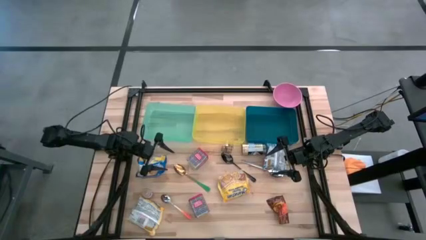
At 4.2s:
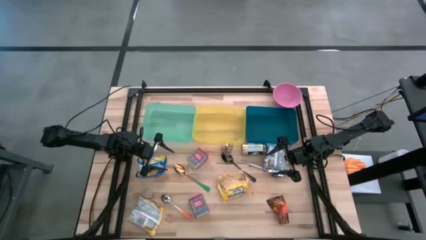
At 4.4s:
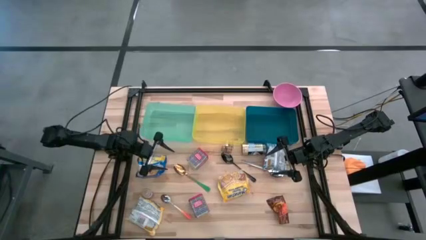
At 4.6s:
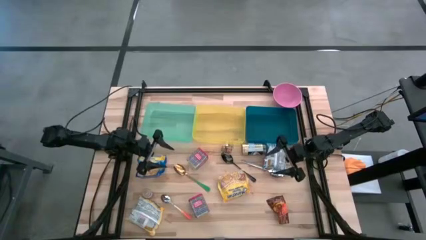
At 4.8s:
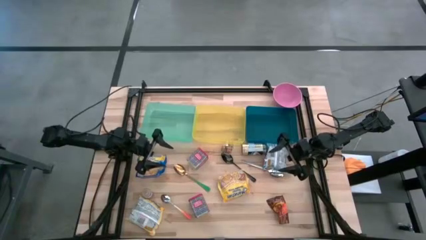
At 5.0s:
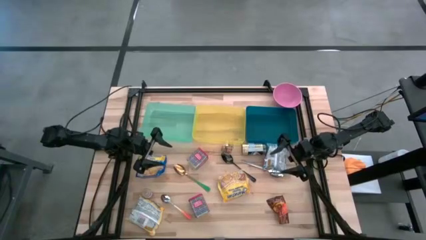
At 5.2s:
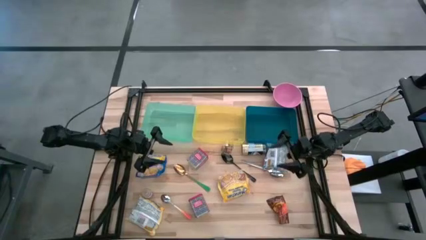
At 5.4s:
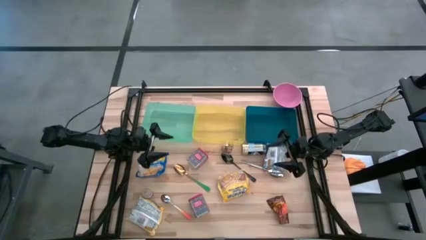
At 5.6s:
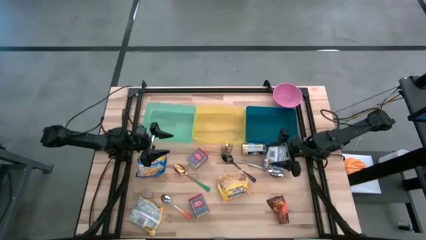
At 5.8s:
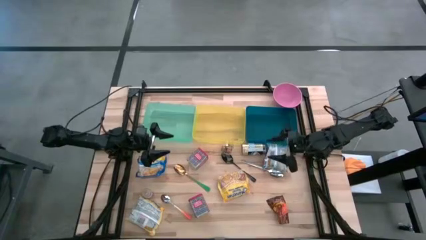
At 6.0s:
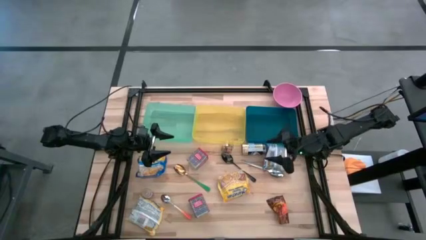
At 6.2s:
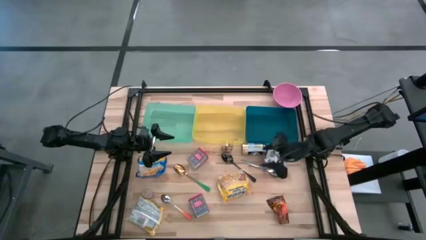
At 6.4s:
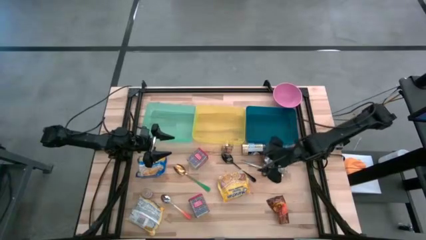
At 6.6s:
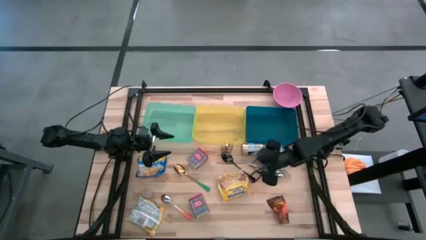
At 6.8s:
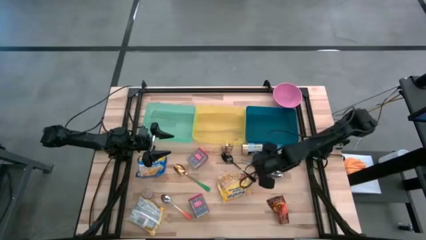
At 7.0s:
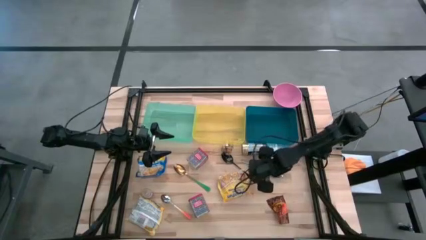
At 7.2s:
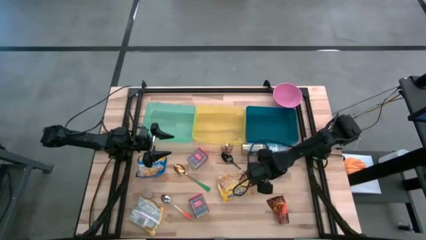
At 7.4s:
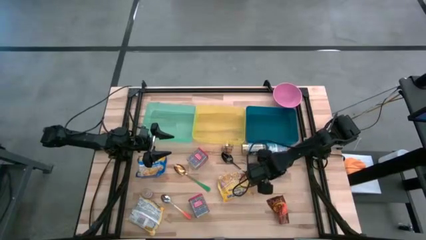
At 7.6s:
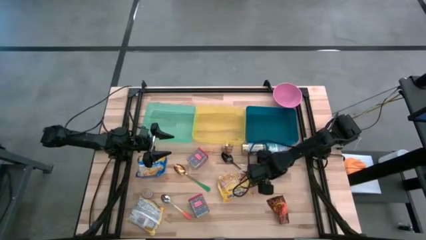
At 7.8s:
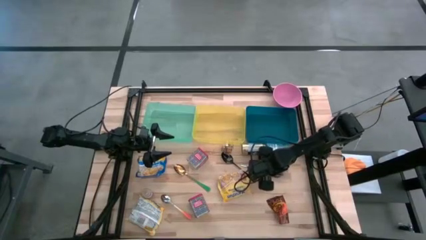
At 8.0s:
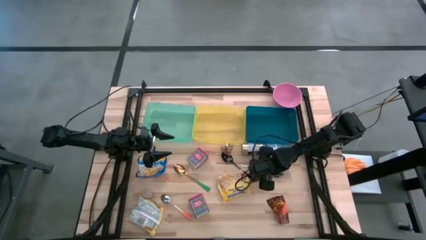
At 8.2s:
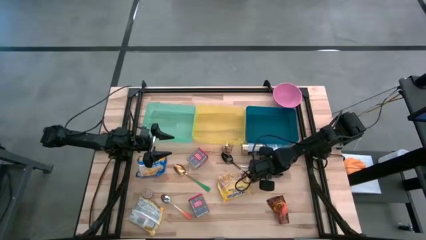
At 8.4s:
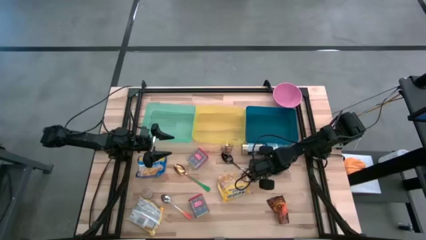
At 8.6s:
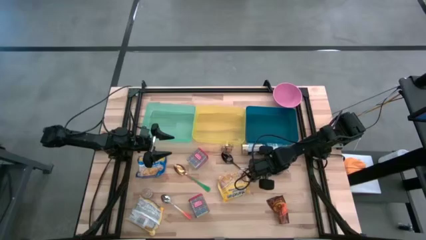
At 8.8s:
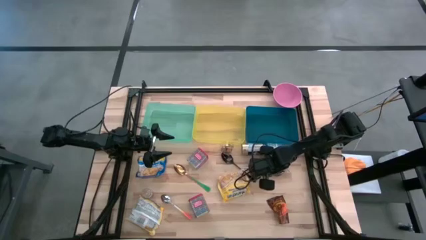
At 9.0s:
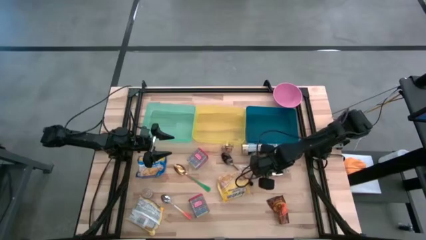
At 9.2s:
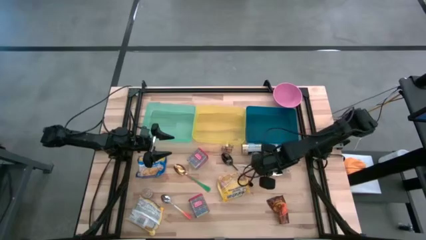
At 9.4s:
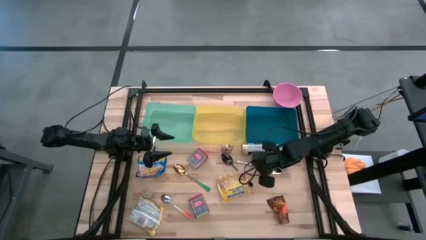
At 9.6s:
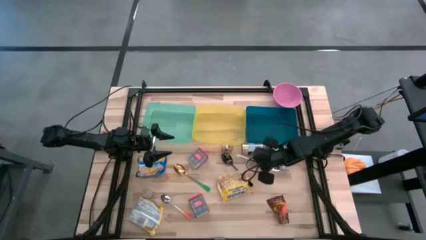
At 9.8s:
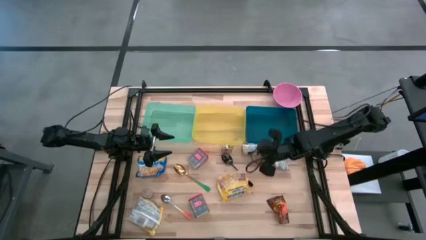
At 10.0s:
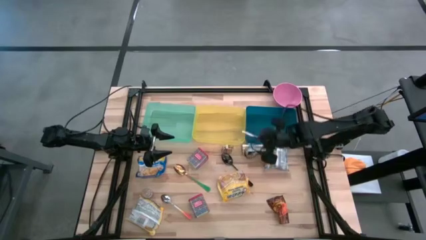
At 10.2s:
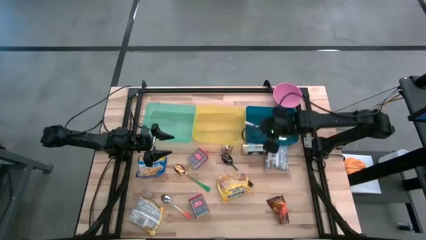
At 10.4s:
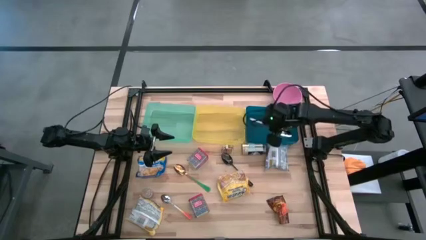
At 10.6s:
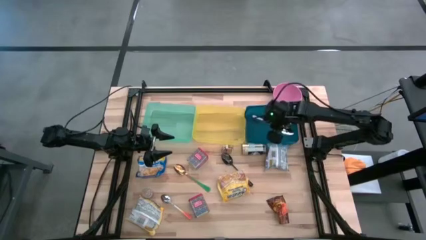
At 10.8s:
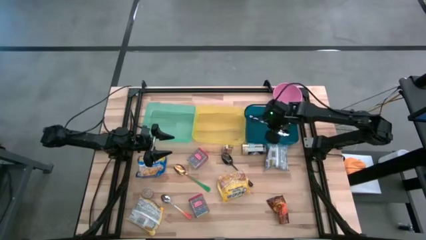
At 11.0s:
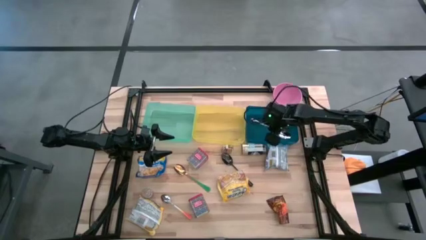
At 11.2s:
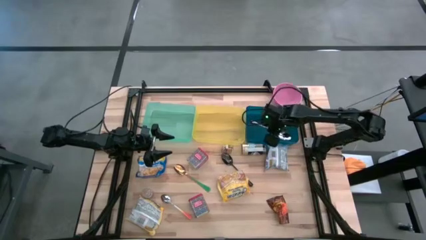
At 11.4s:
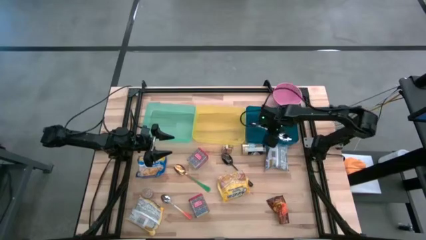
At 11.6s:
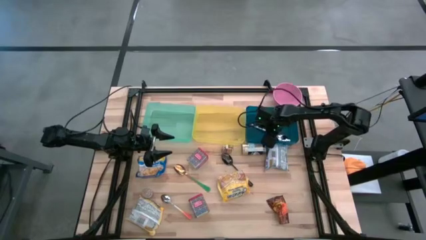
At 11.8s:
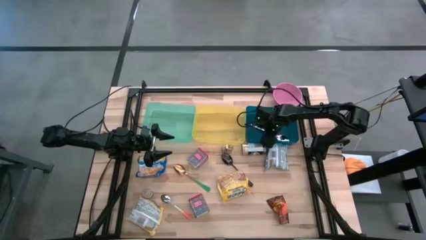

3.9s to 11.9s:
Put the silver spoon into the blue bin

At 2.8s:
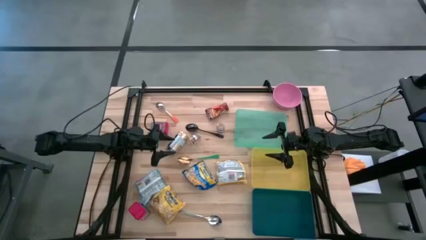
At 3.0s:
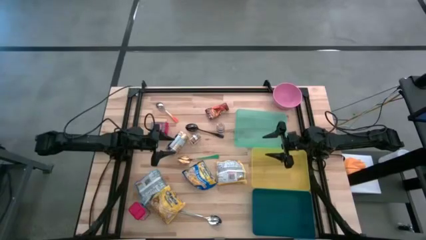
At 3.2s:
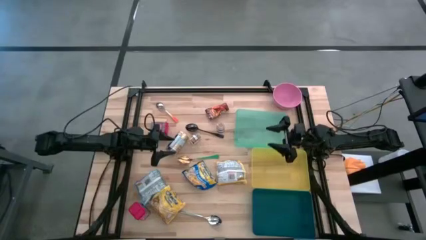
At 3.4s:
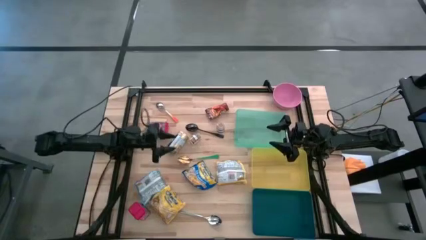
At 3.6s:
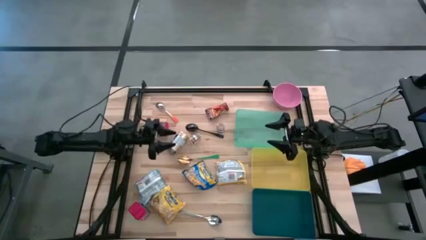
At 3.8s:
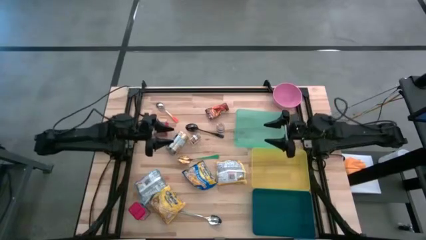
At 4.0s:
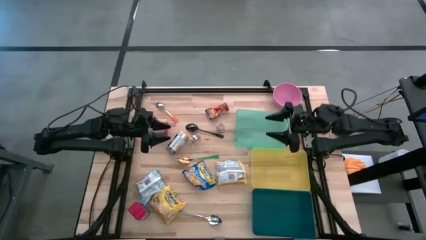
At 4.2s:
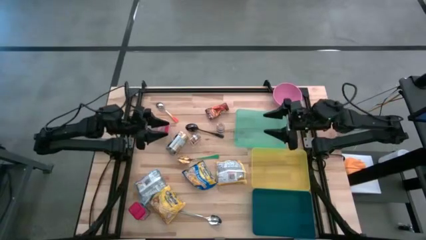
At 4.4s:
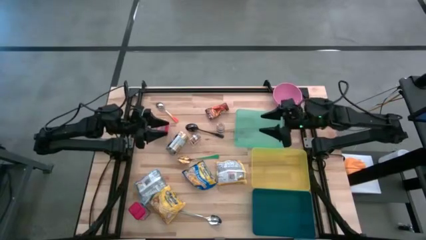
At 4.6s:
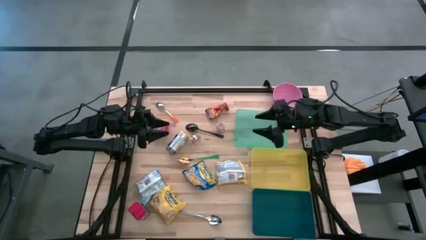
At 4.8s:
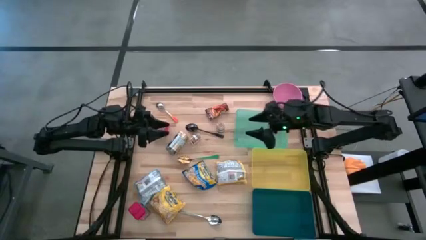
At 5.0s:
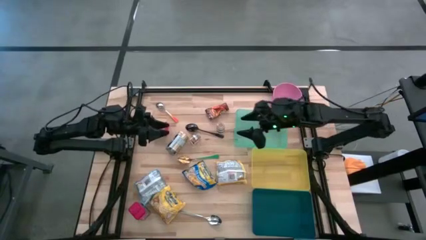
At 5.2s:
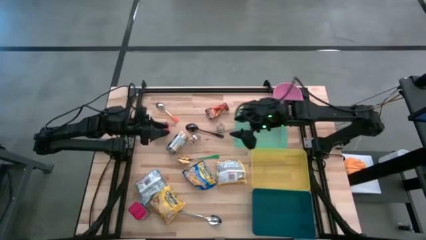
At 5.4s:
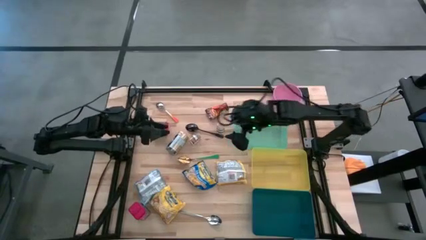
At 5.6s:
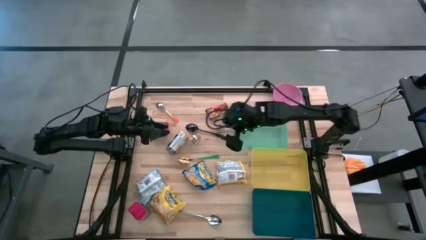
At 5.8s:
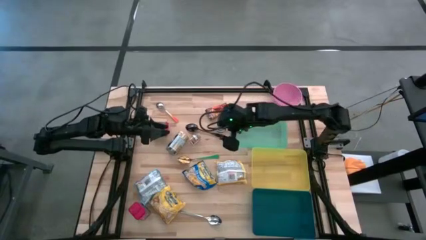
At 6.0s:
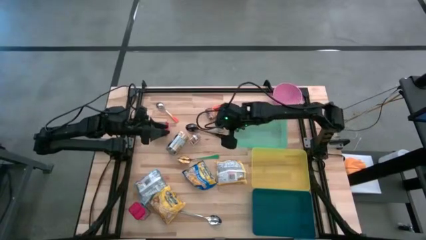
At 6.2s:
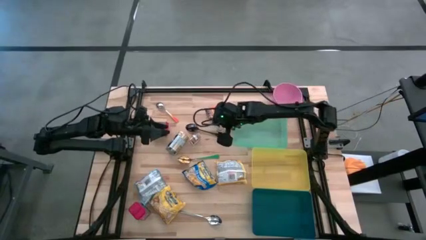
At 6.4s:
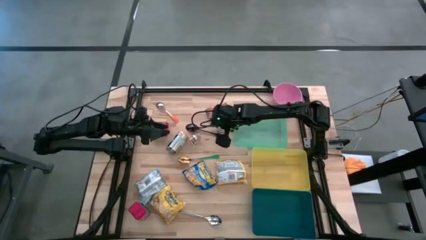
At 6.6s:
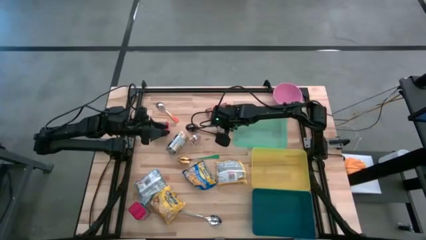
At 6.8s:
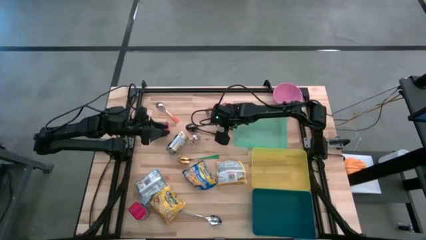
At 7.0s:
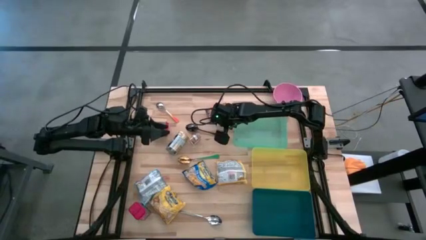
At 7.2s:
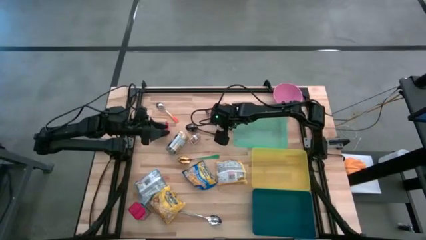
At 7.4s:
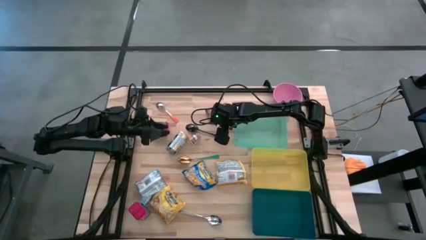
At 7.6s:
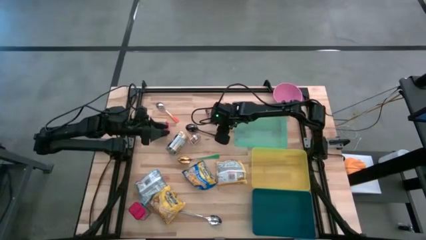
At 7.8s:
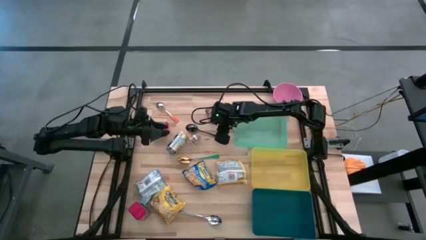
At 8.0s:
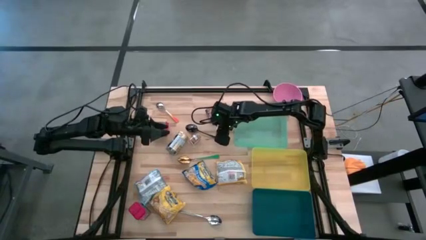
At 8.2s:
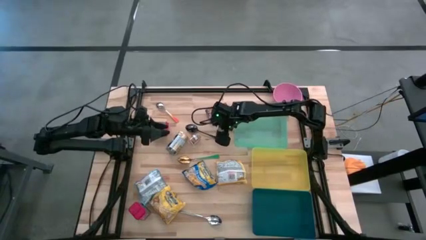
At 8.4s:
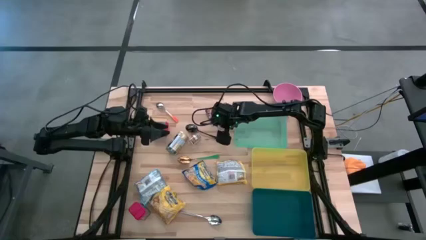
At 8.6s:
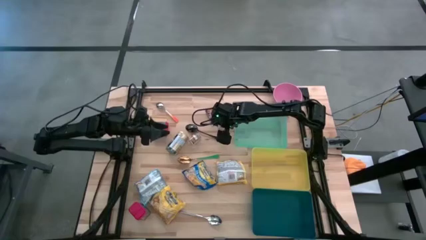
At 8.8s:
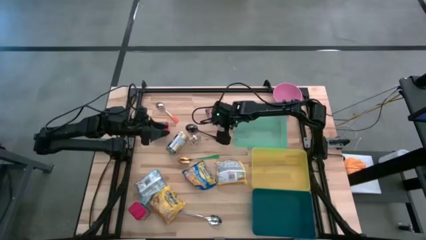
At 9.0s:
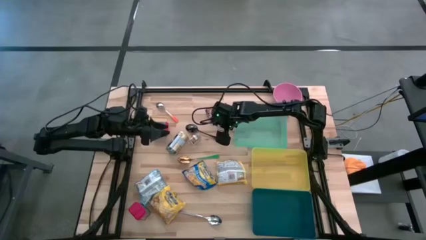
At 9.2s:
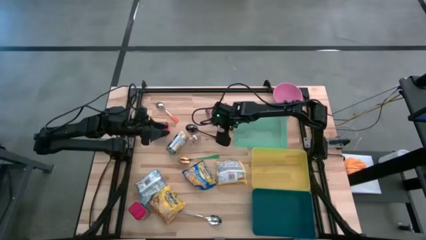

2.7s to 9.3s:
Put the right brown seasoning bottle into the green bin

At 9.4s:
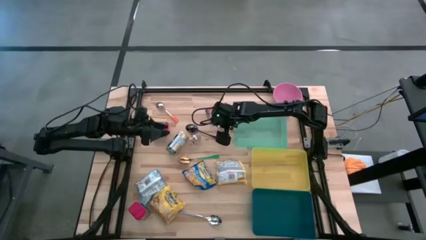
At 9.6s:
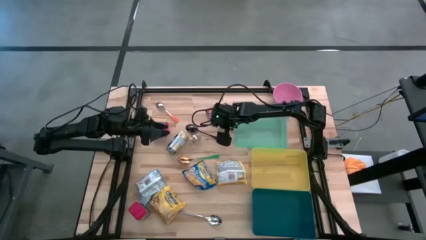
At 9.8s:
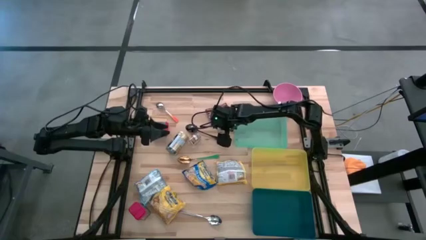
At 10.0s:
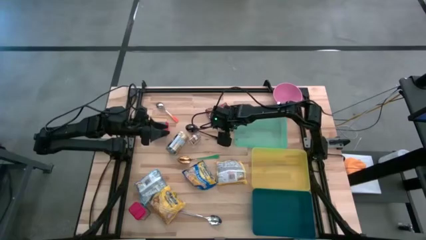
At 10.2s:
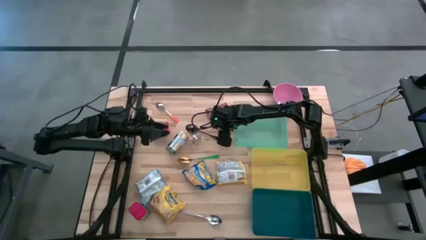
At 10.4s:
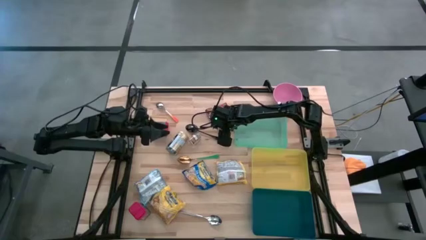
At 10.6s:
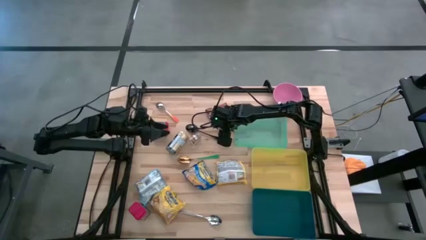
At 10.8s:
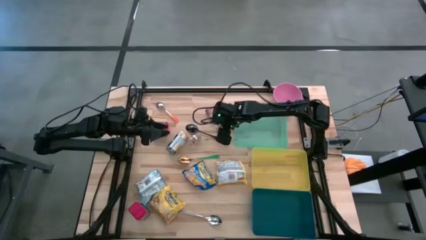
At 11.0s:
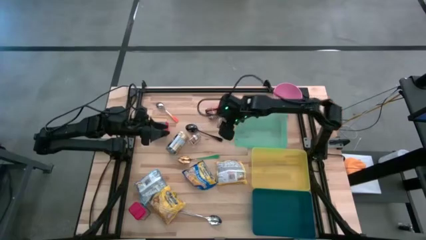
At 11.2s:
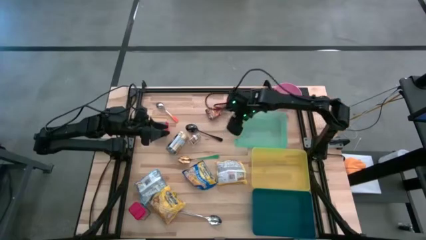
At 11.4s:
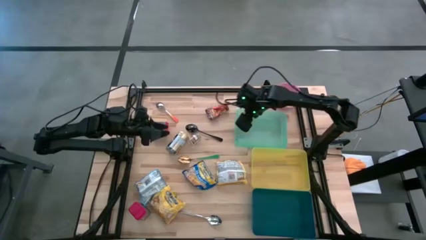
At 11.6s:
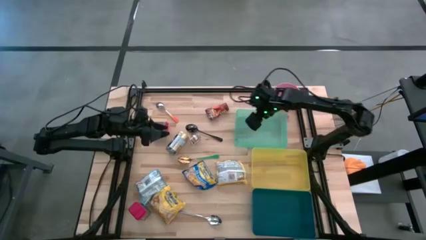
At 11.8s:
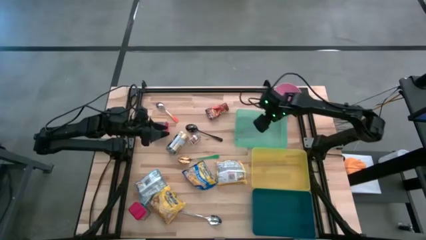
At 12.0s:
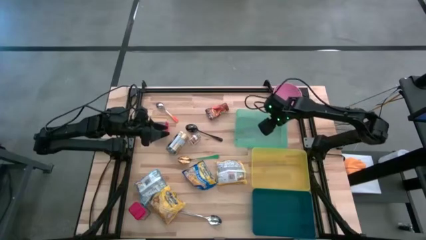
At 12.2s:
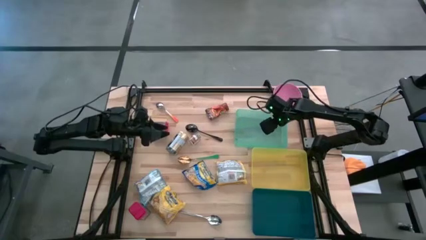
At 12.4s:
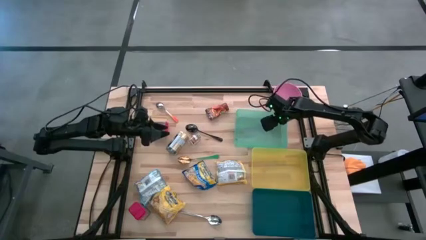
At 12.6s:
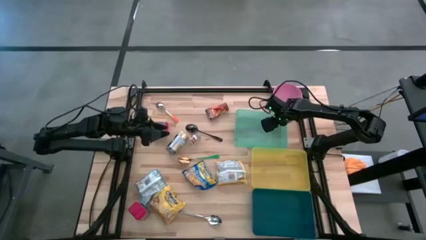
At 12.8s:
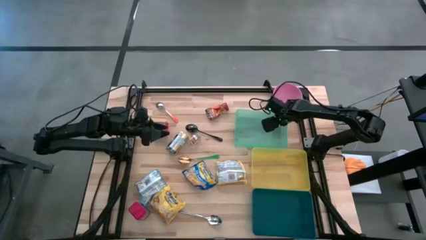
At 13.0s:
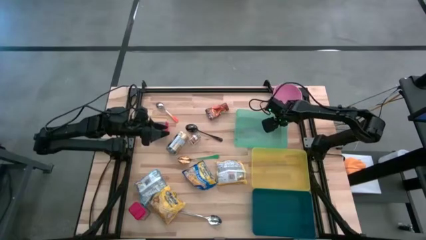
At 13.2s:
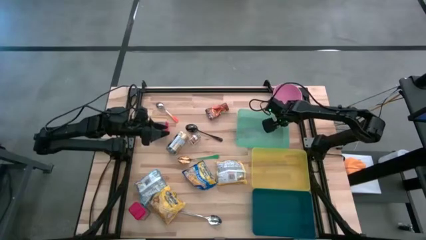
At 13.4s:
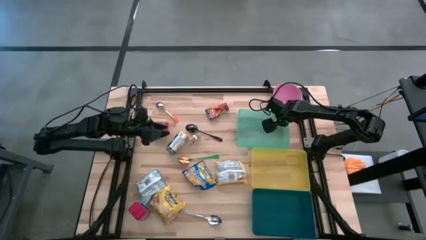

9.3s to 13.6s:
Put the right brown seasoning bottle into the green bin
